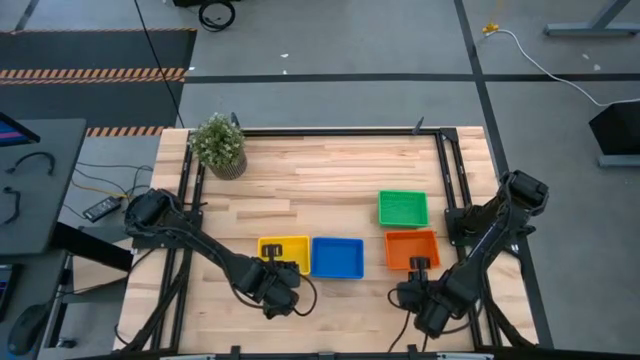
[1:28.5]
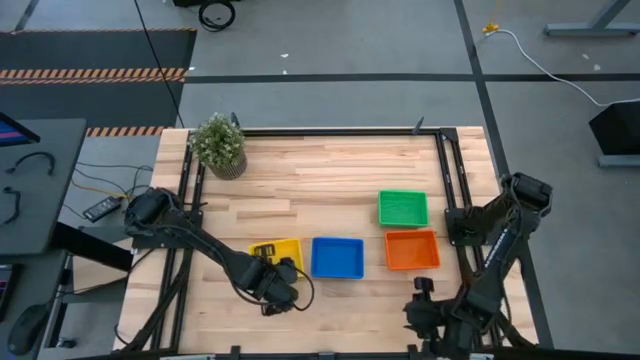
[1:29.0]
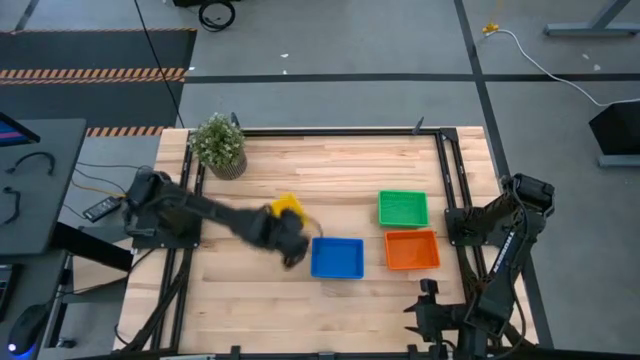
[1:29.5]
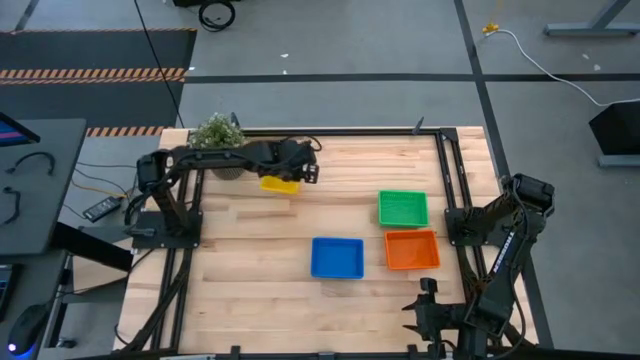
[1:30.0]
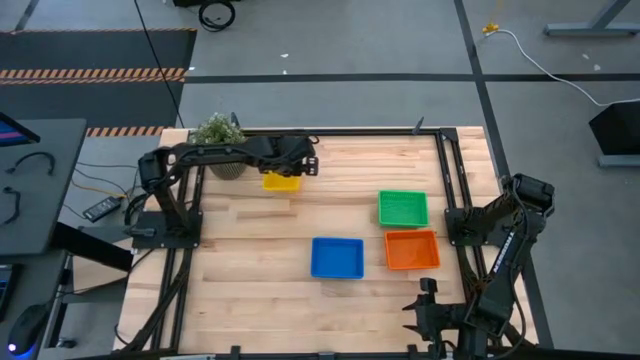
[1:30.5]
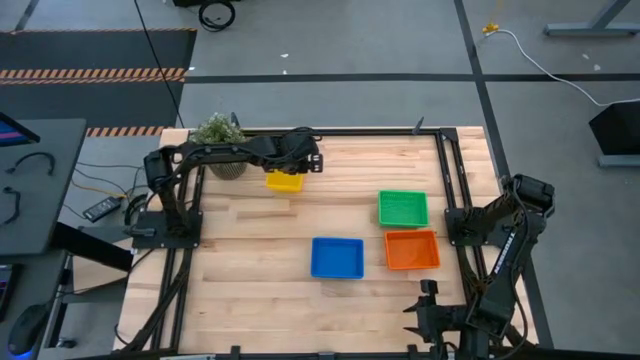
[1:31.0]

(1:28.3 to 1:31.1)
Move the stacked yellow bins to the top left of the table

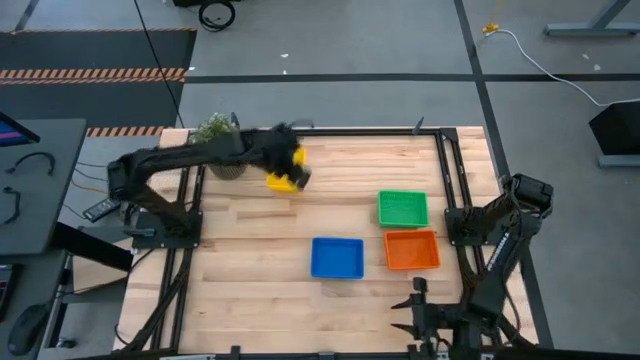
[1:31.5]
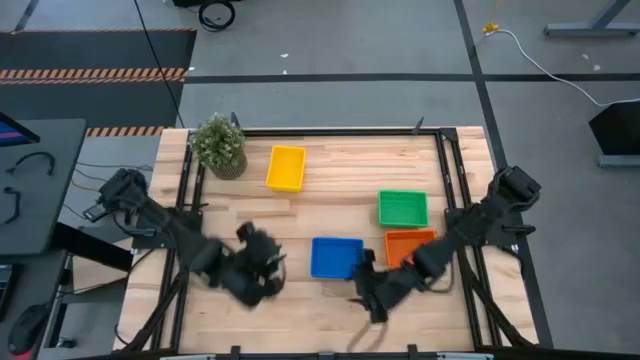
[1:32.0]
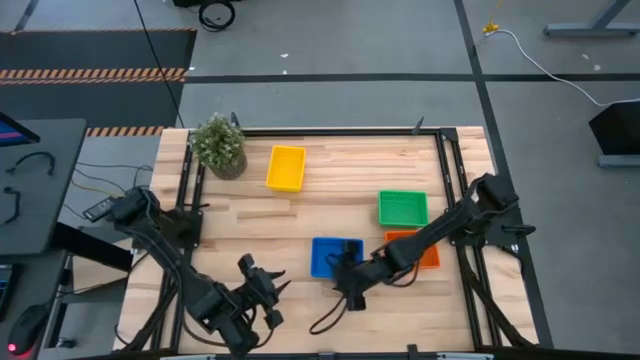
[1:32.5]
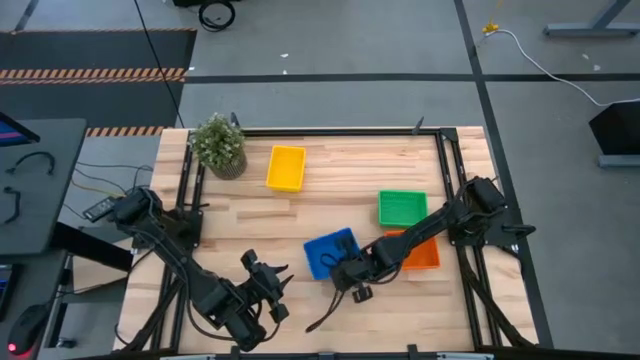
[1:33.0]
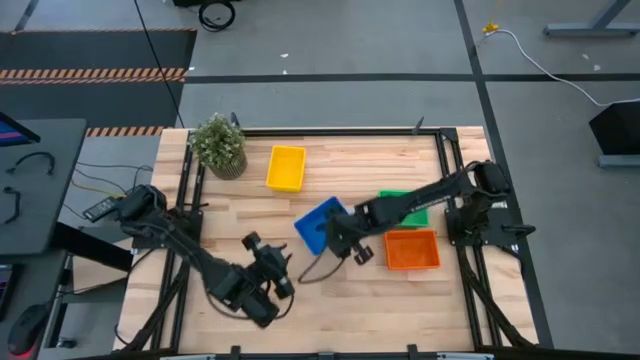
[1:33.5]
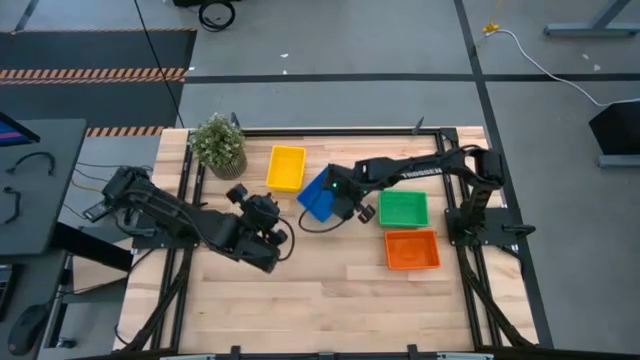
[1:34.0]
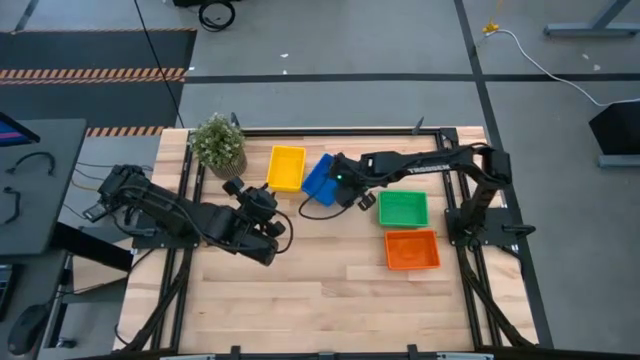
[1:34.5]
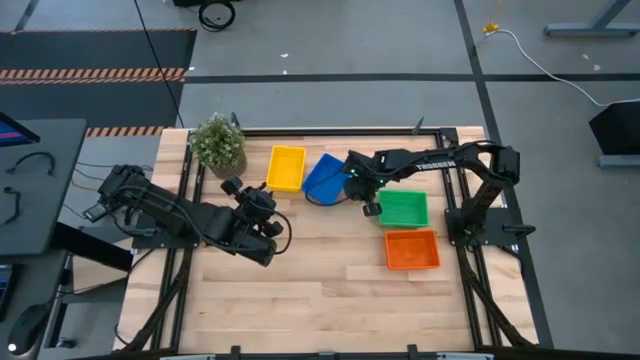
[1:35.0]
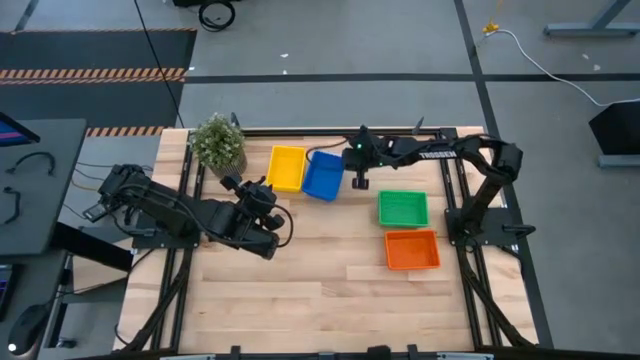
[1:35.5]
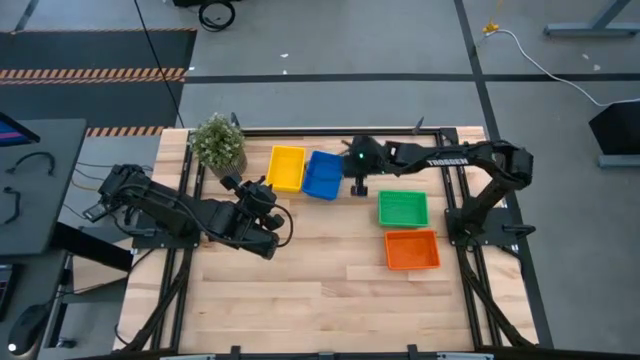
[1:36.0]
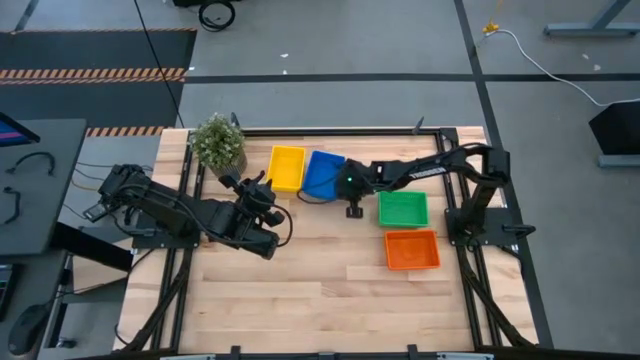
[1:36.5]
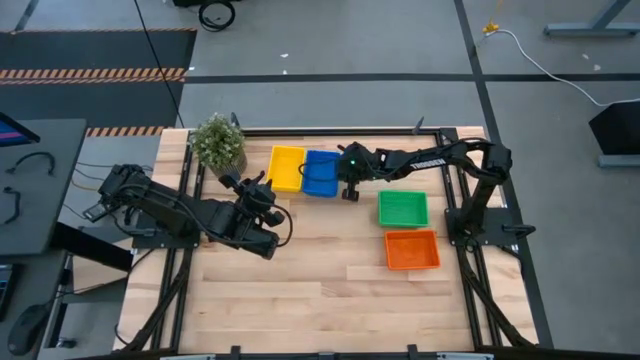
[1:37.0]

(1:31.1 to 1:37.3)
Move the stacked blue bins to the right of the stacked yellow bins

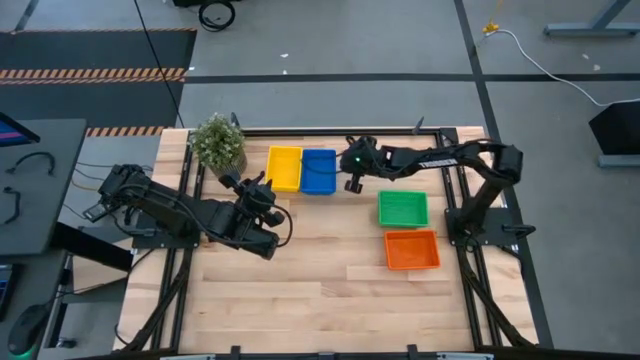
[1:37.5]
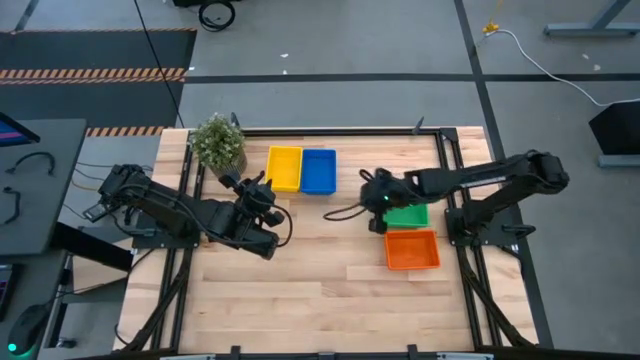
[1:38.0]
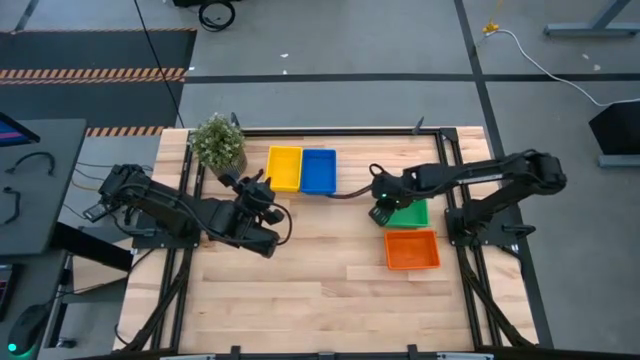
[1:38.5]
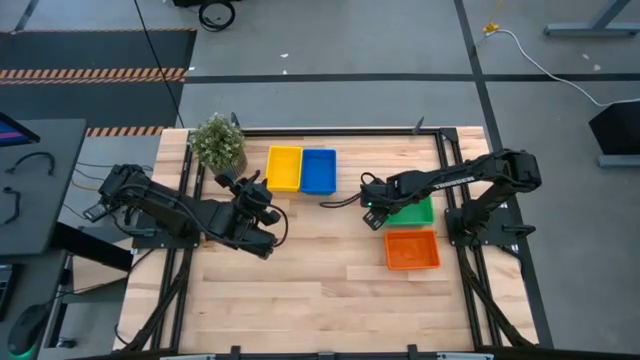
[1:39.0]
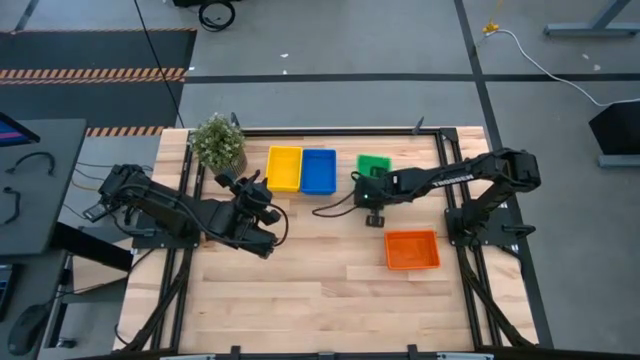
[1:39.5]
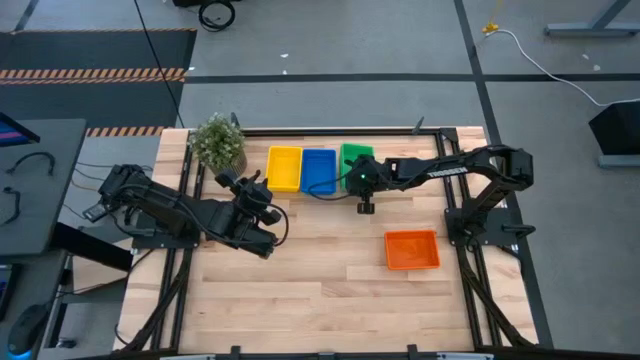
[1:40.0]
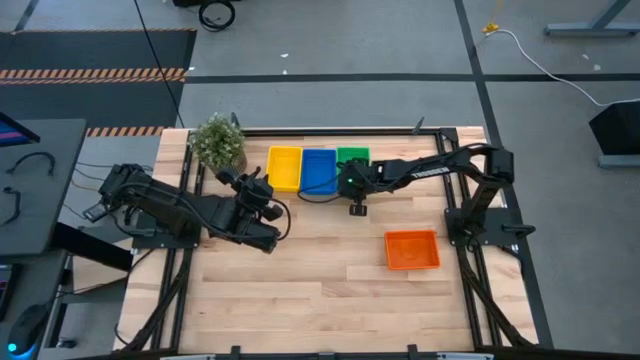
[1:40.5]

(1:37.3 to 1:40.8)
Move the stacked green bins to the right of the stacked blue bins

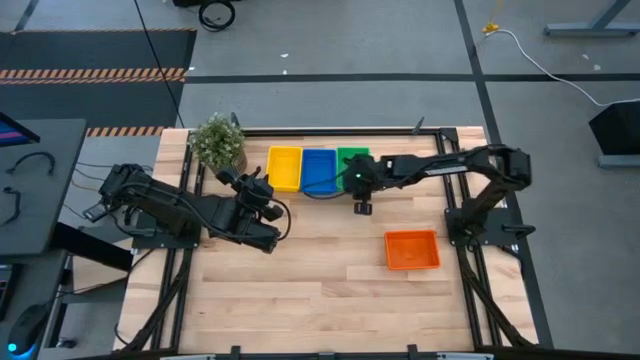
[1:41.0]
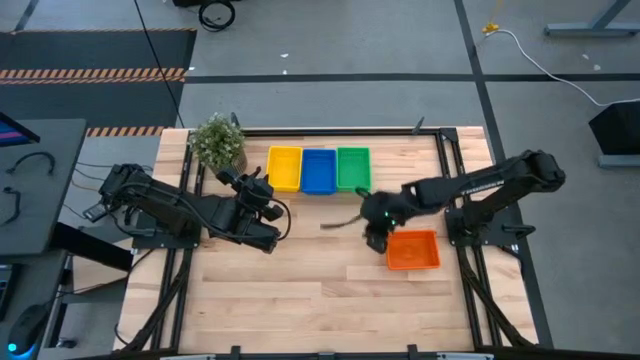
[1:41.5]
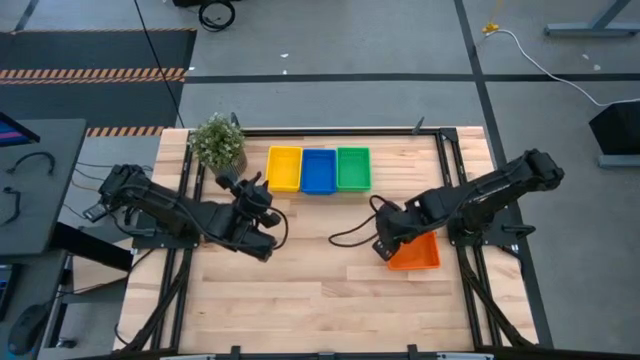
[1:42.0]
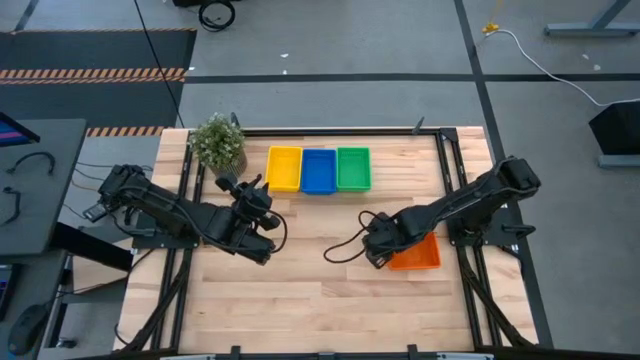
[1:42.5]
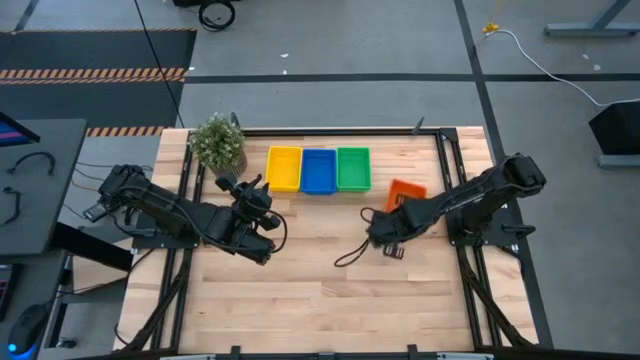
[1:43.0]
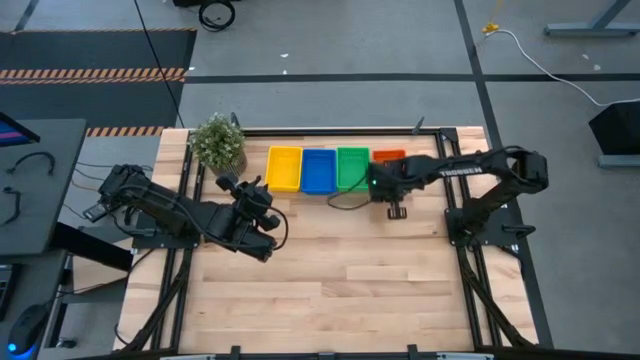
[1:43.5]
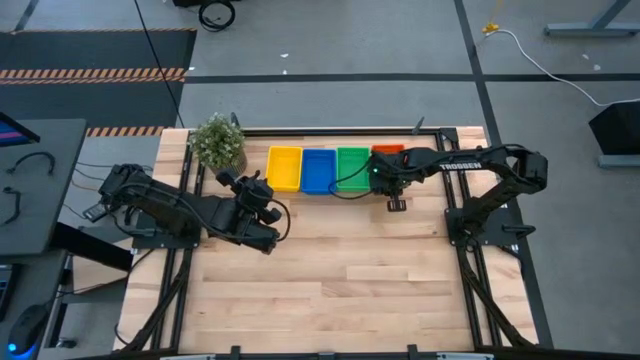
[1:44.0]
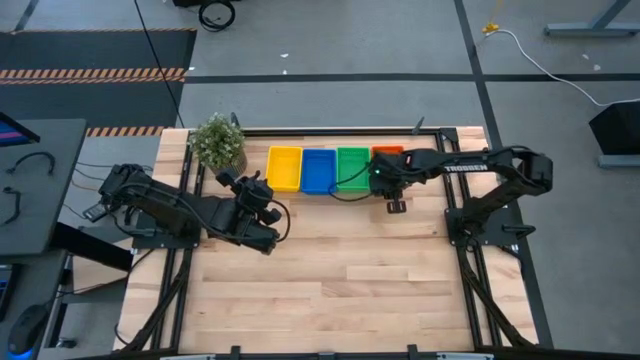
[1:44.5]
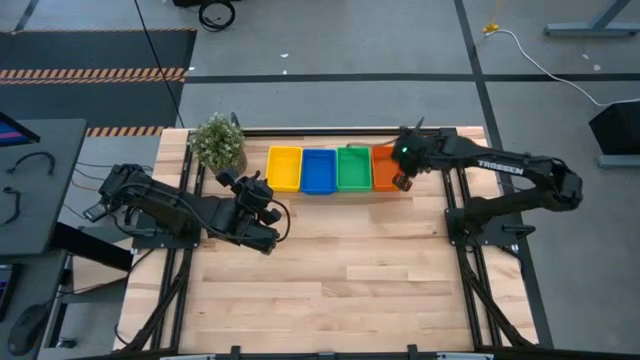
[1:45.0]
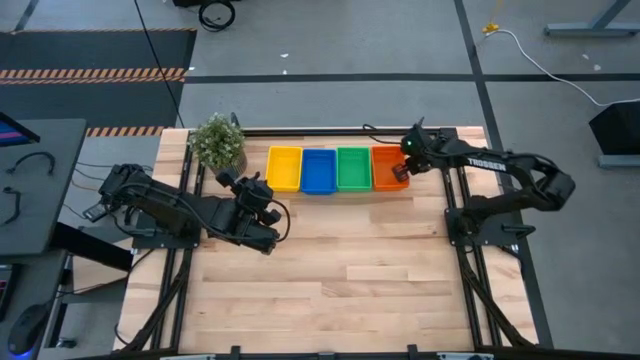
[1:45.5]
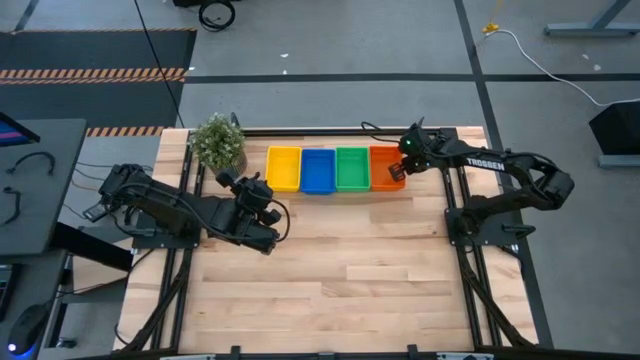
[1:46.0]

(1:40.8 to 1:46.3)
Move the stacked orange bins to the right of the stacked green bins

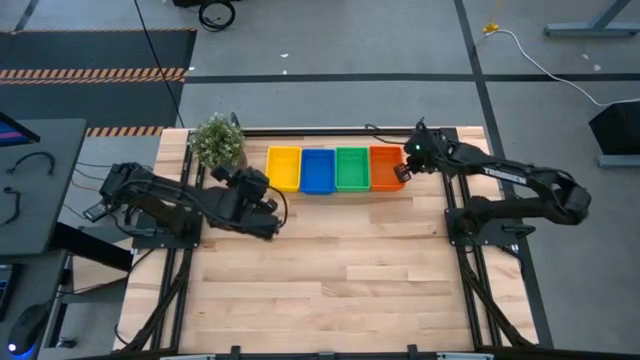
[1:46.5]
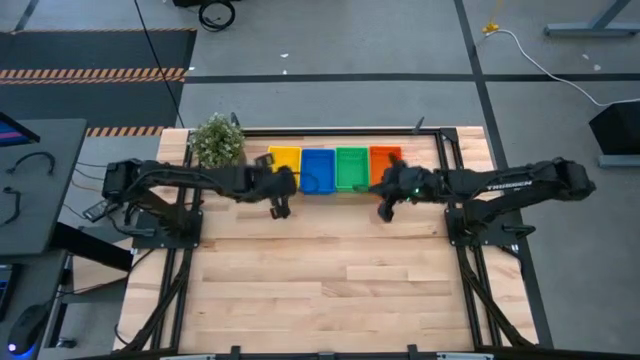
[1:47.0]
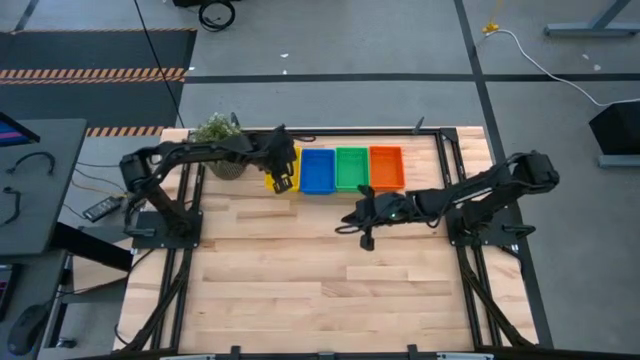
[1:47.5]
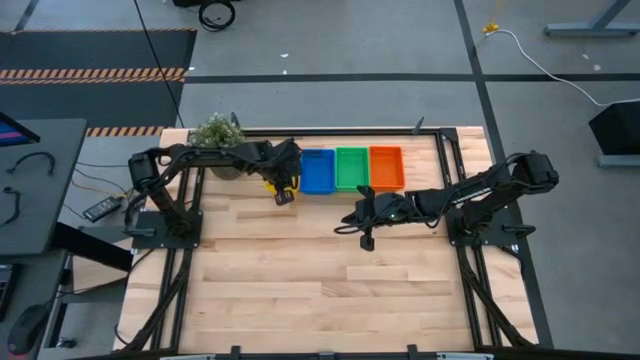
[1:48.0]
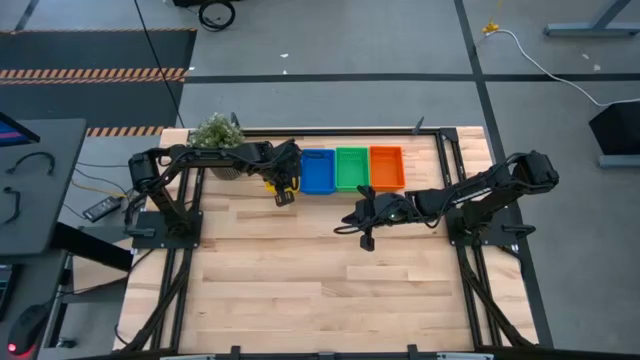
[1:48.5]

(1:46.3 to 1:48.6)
Adjust the stacked yellow bins

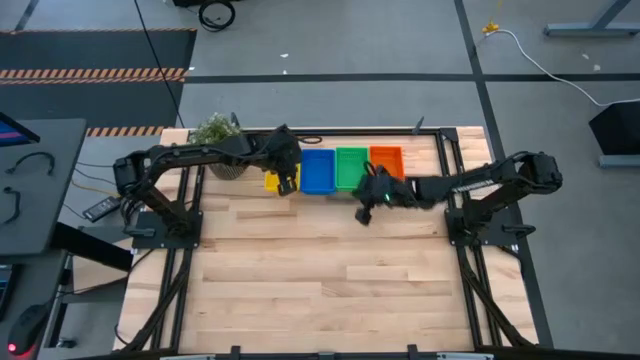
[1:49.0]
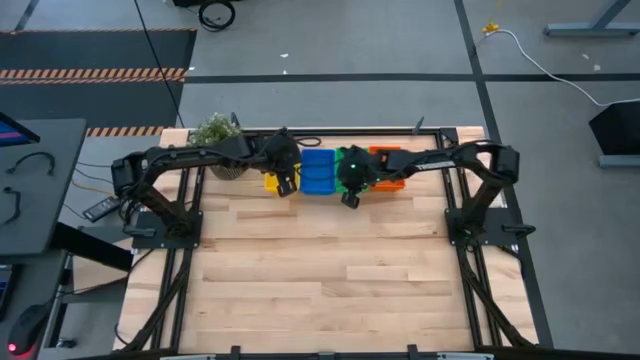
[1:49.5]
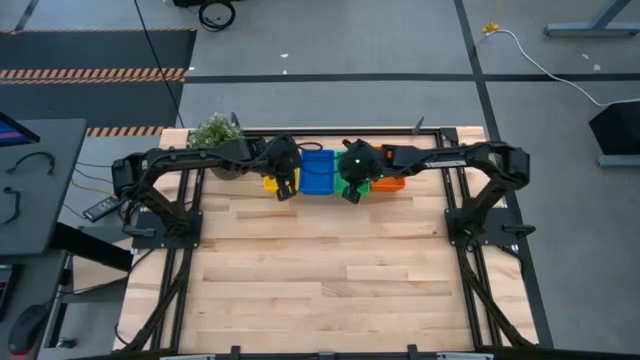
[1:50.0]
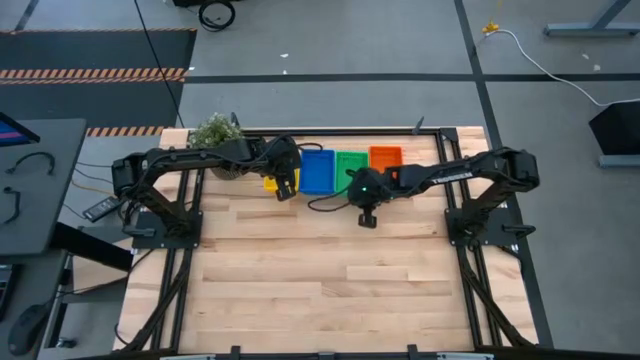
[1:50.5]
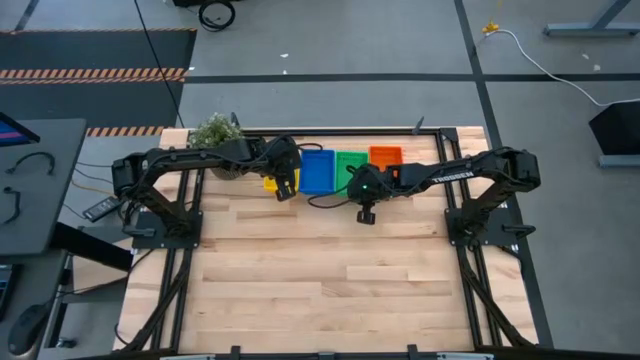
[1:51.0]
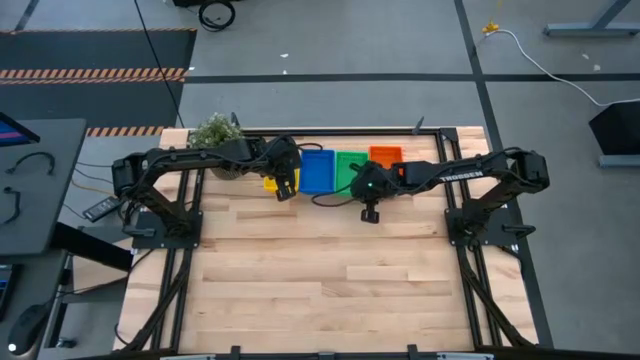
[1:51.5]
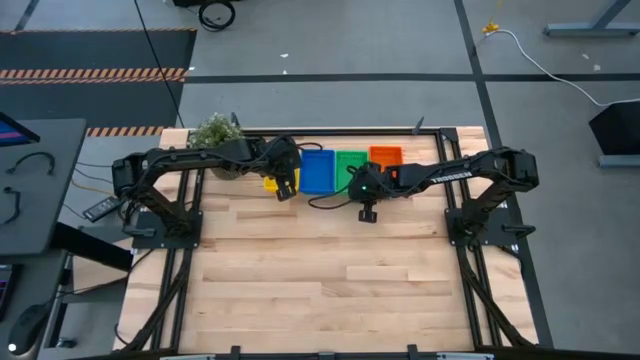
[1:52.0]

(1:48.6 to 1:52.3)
Adjust the stacked green bins
